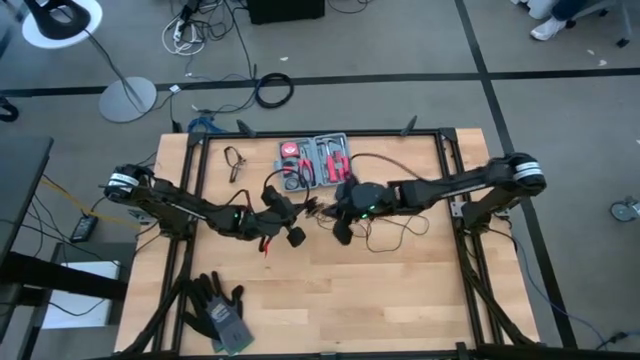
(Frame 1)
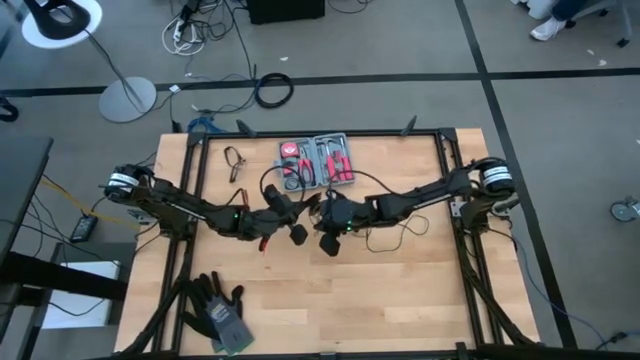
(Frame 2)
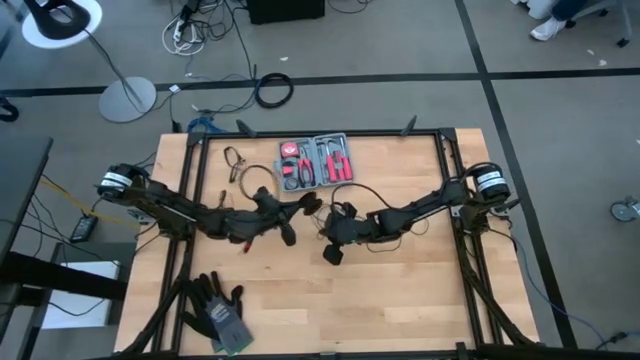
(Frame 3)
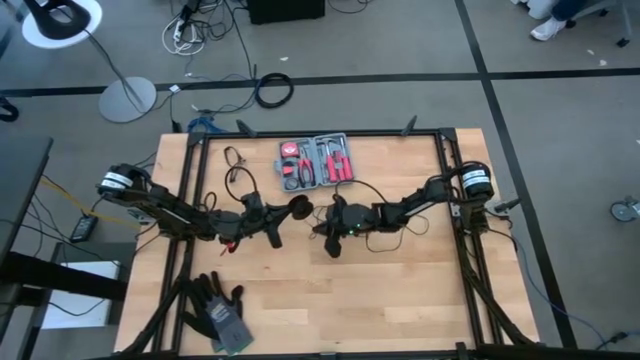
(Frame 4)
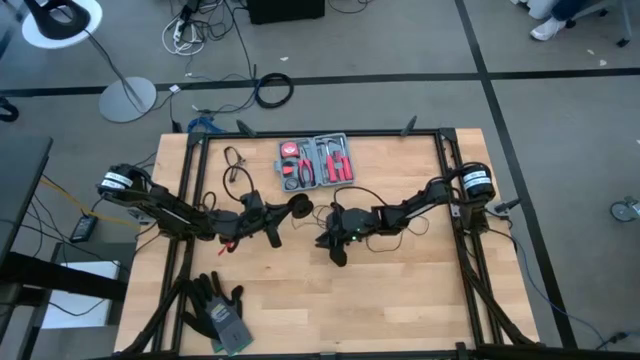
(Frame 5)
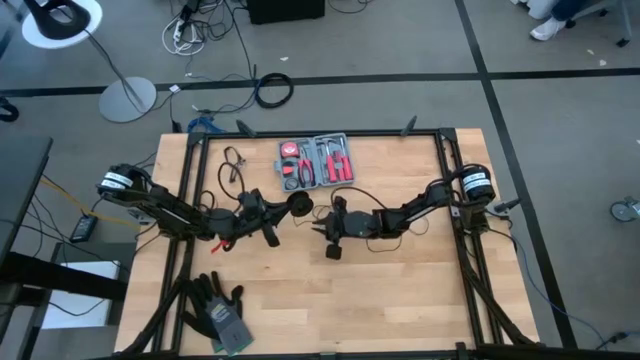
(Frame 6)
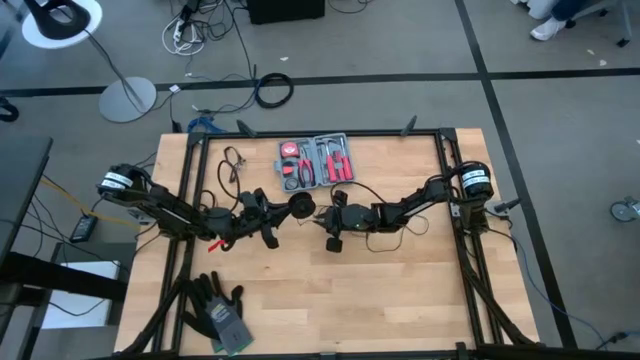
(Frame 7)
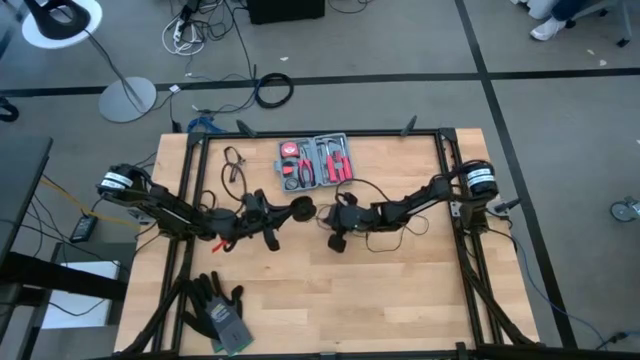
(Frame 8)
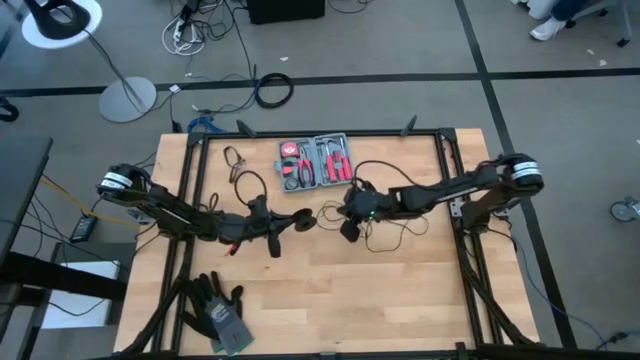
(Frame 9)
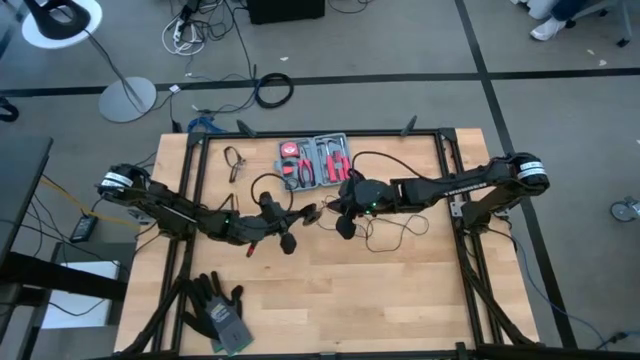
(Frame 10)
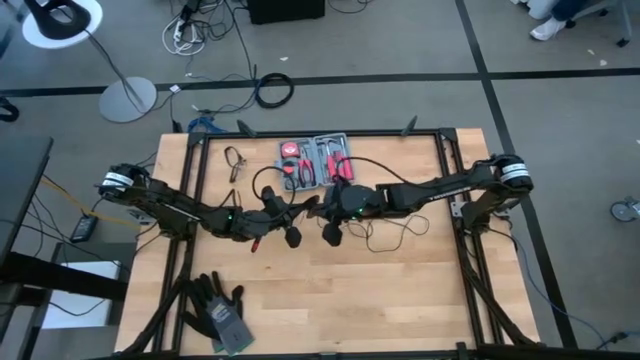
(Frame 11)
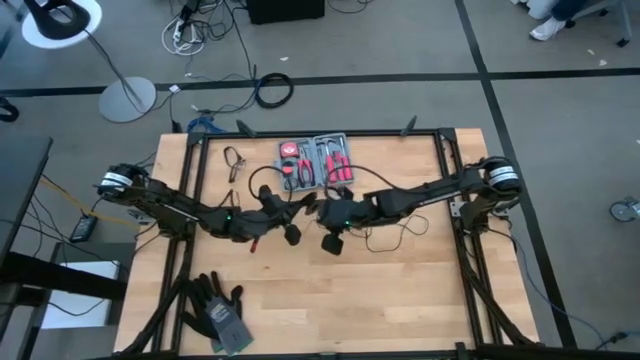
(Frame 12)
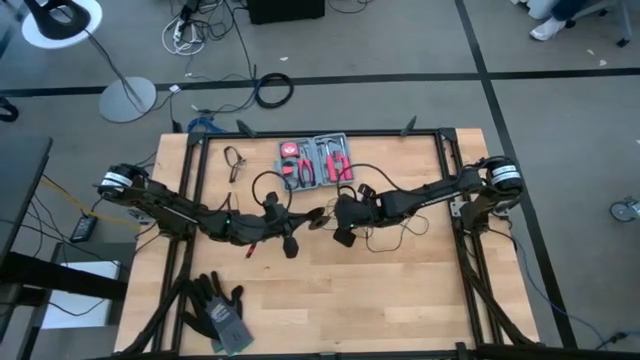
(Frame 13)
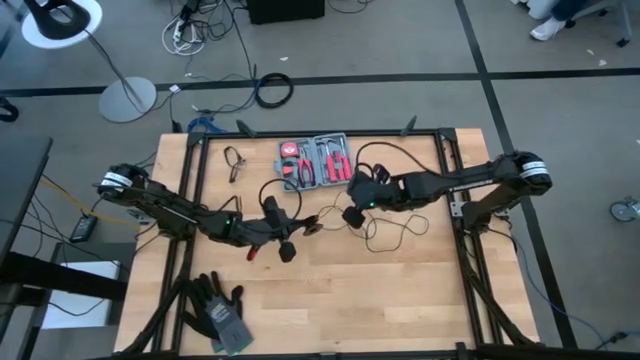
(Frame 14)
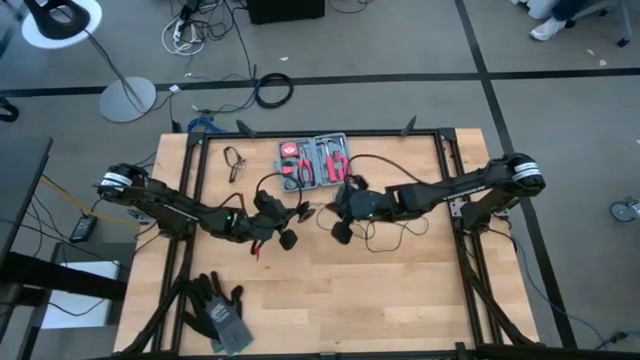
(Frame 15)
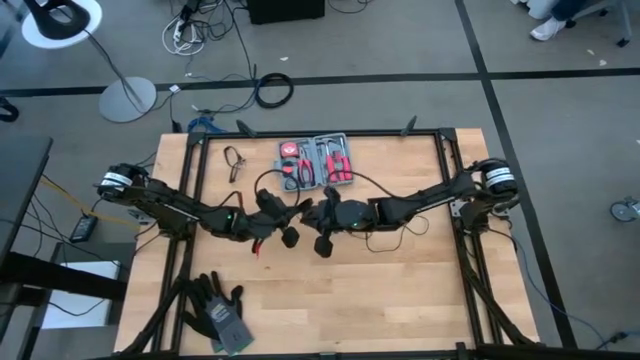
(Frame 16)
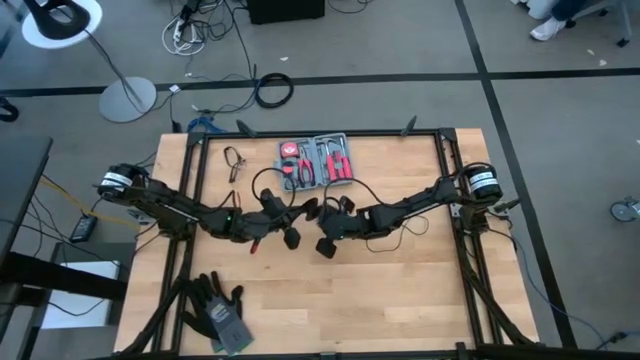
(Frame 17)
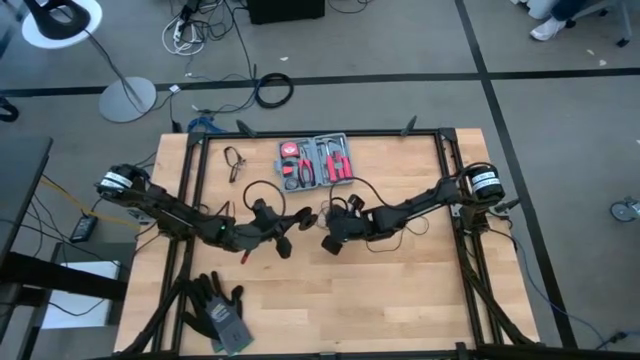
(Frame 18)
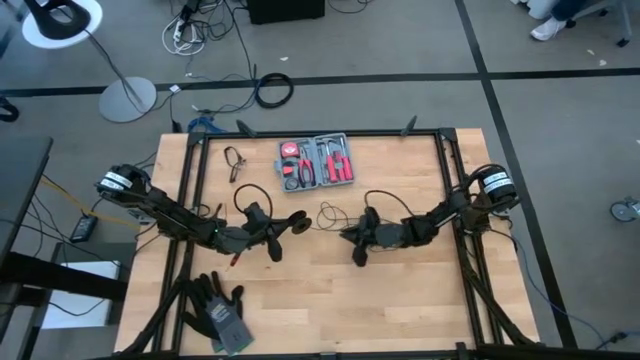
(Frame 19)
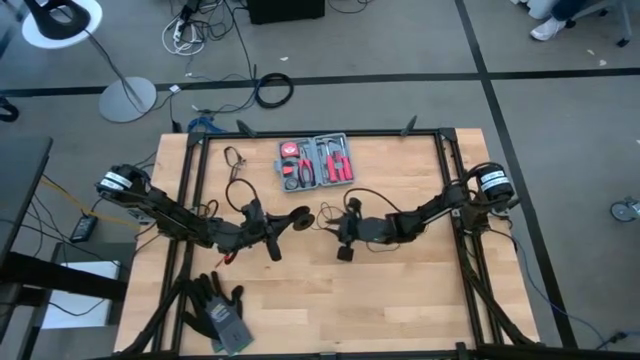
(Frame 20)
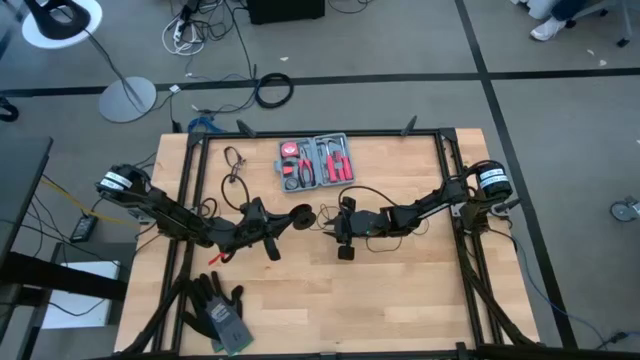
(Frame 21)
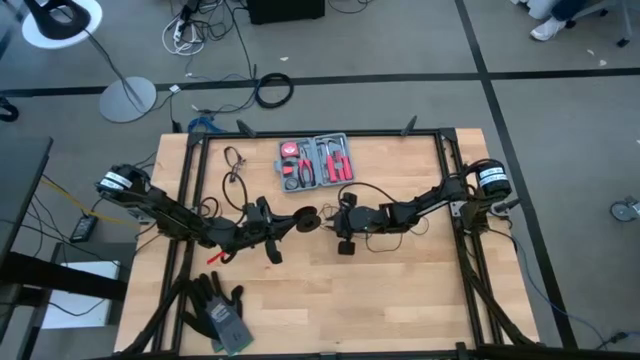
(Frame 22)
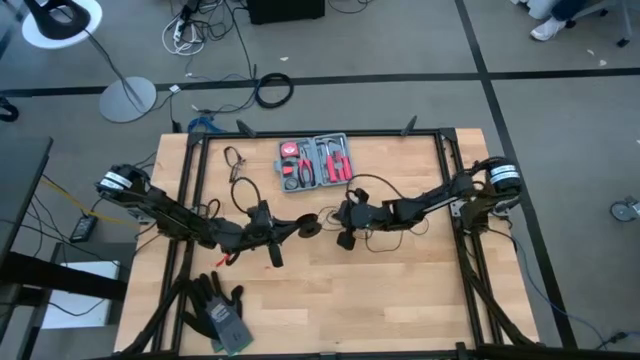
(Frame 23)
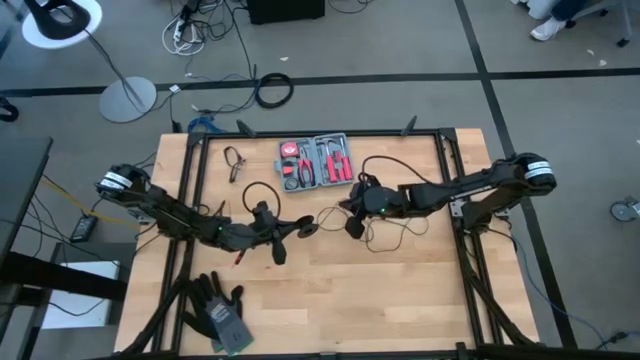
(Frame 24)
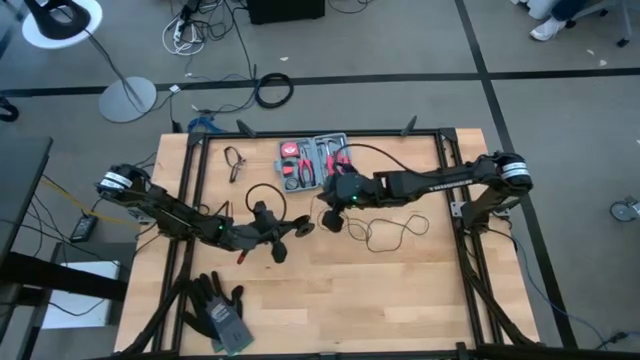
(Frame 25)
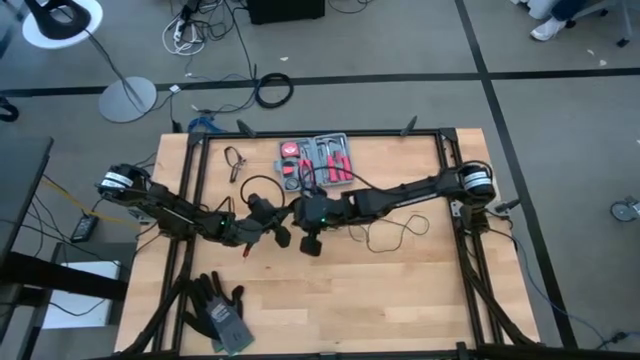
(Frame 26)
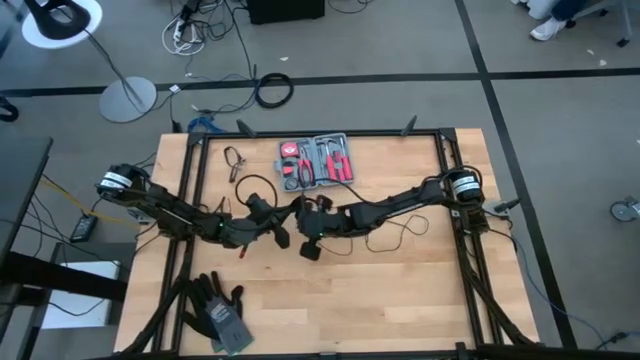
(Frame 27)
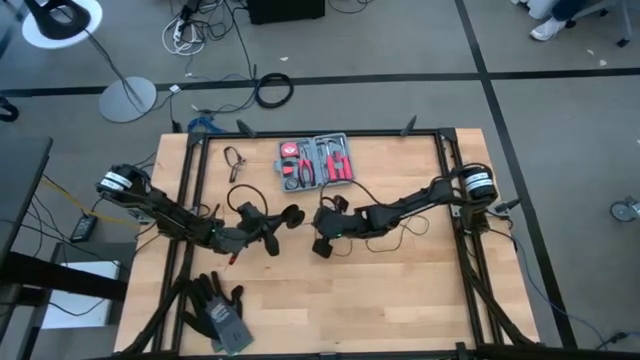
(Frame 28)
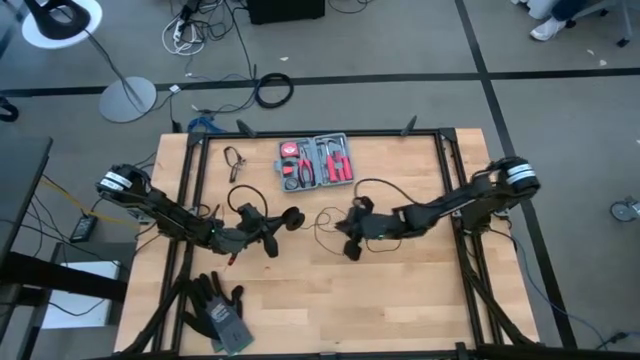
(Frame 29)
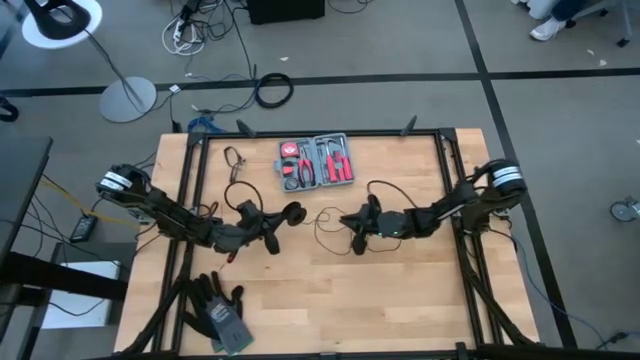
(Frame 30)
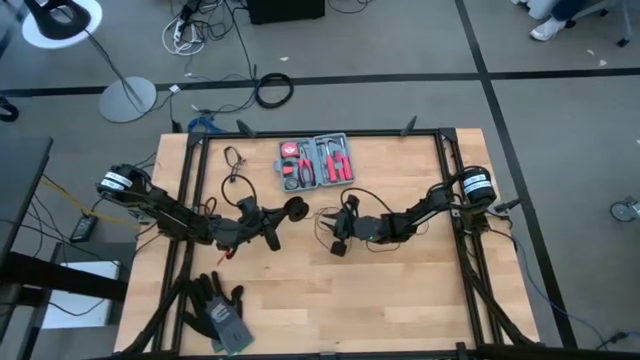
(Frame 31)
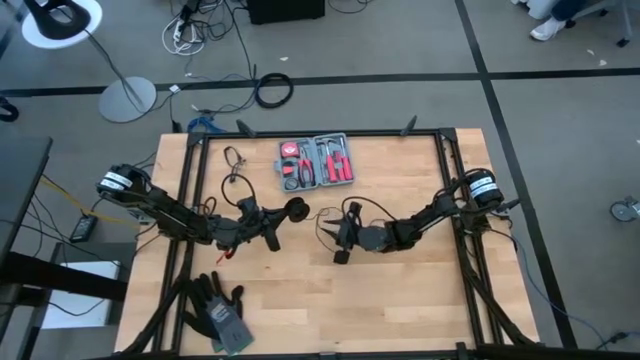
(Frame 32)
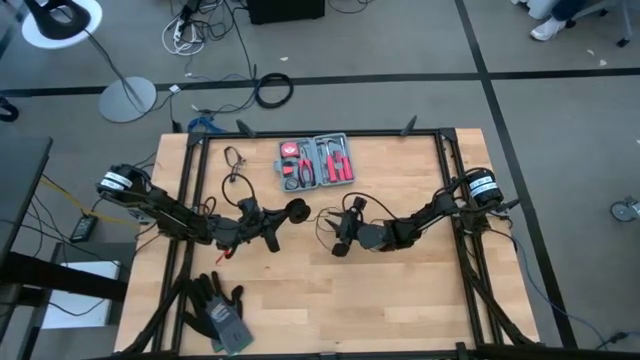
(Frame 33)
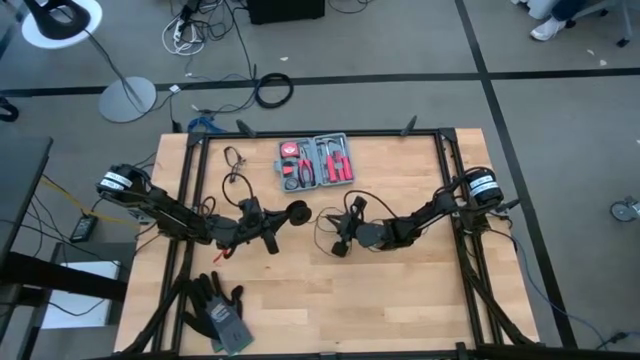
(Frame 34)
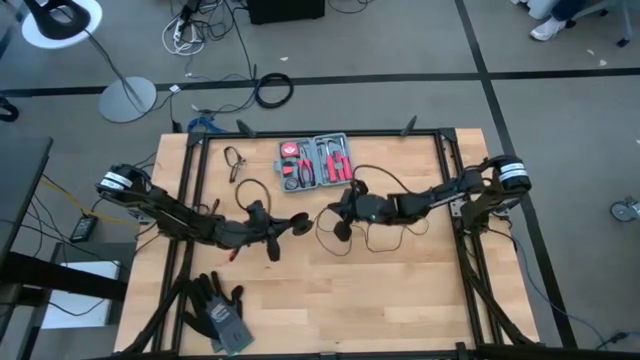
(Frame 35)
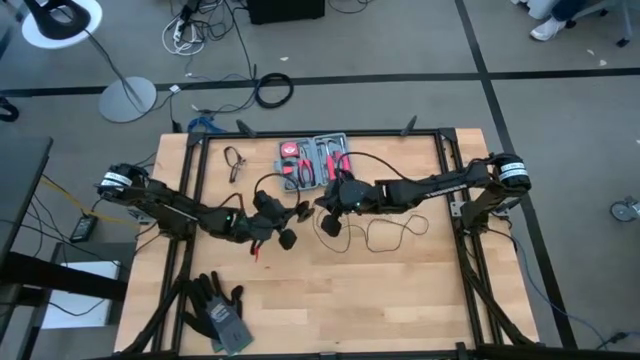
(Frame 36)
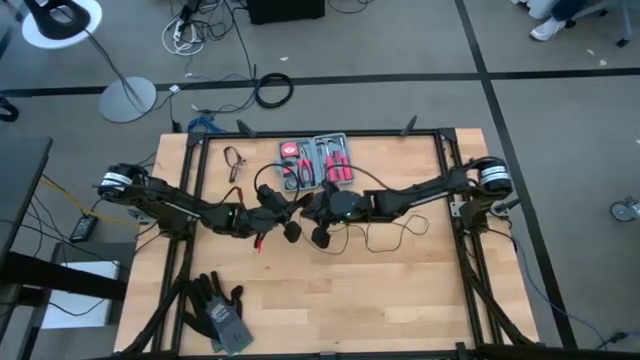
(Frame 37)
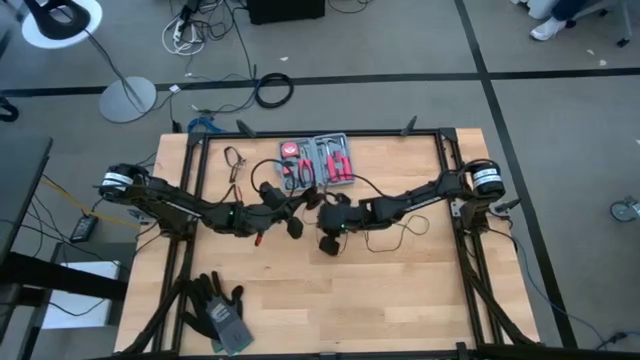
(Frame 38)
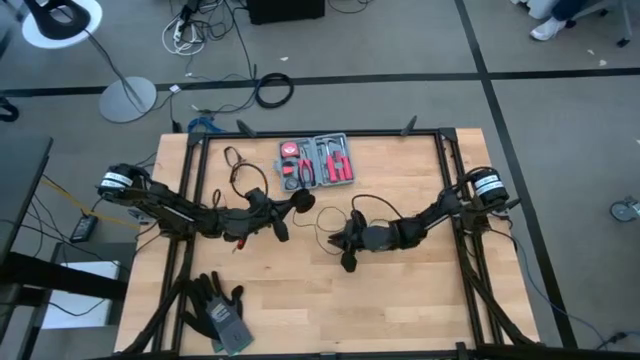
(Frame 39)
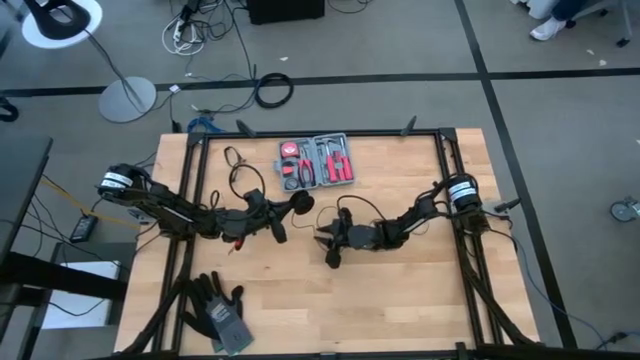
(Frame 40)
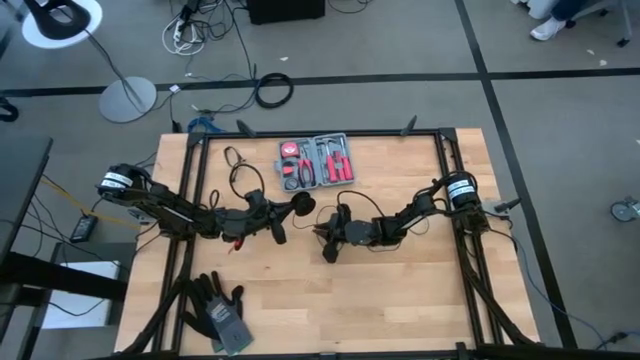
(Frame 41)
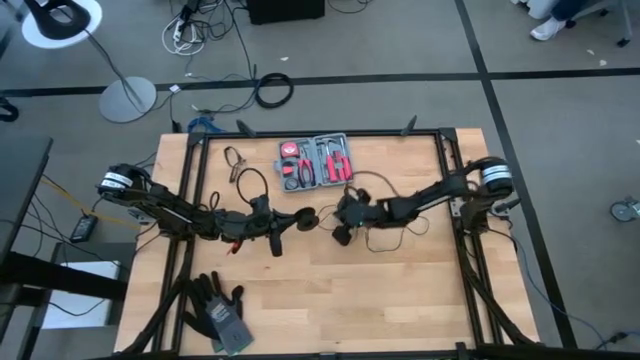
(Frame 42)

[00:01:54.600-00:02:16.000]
Task: Coil cords
Coil the black wire onto the black spool

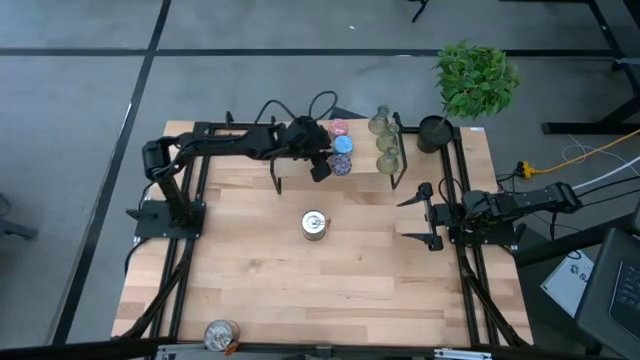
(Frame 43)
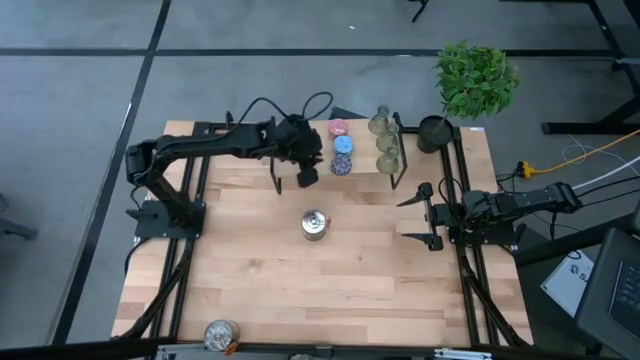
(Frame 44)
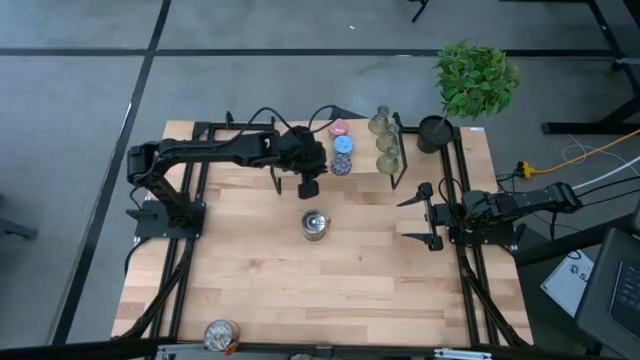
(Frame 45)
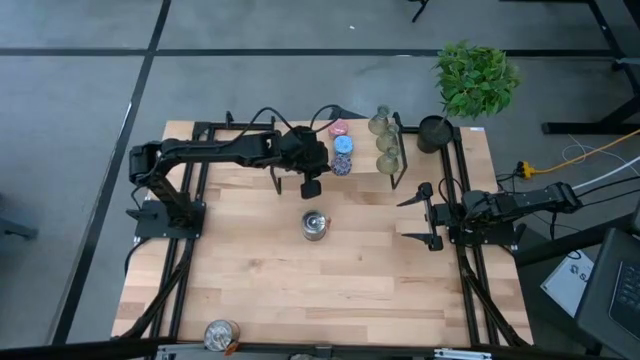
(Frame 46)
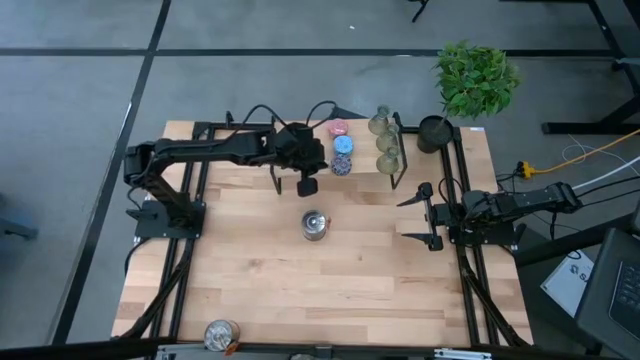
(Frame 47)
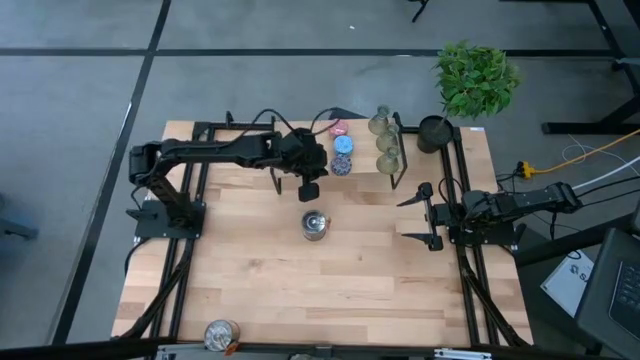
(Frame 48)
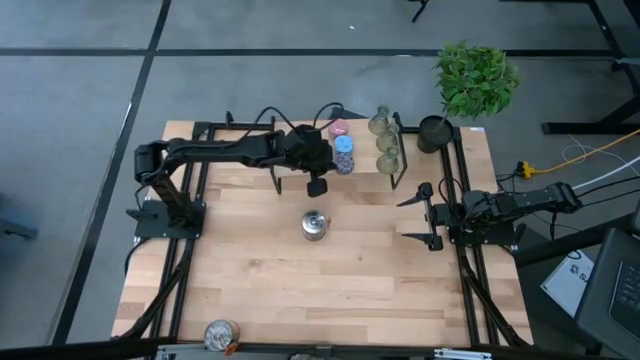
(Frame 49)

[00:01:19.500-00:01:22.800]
Task: Pick & Place candle stick holders
Adjust the red scented candles on the shelf
